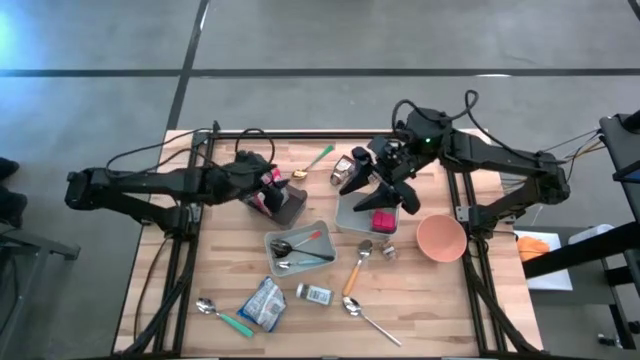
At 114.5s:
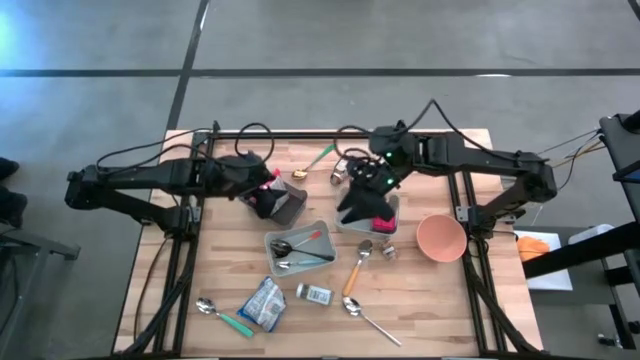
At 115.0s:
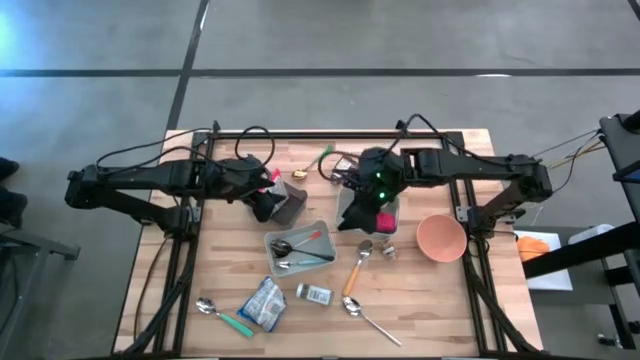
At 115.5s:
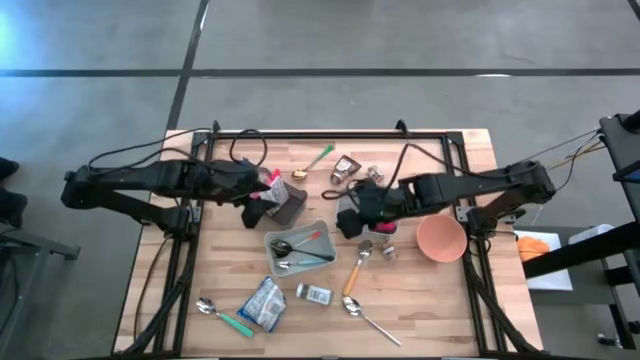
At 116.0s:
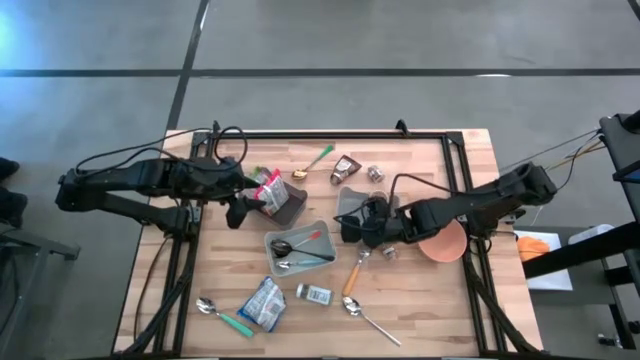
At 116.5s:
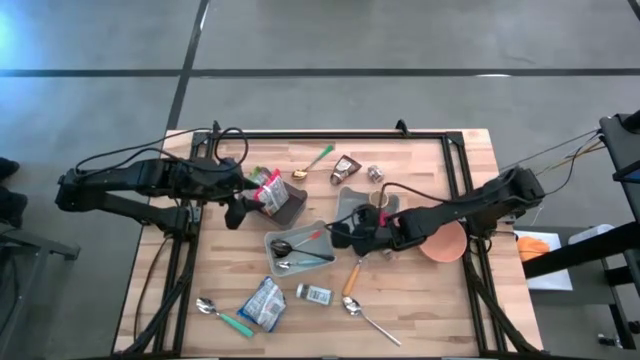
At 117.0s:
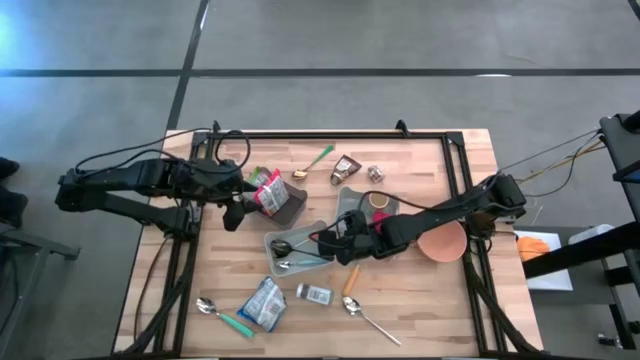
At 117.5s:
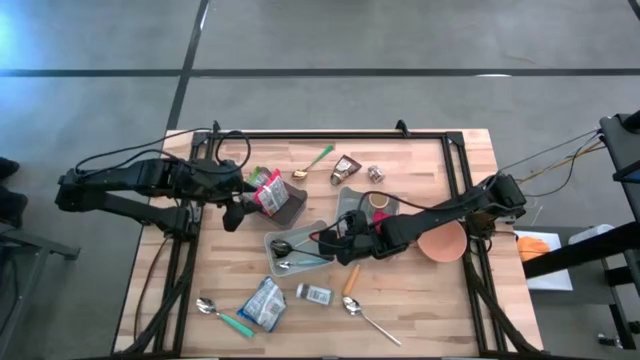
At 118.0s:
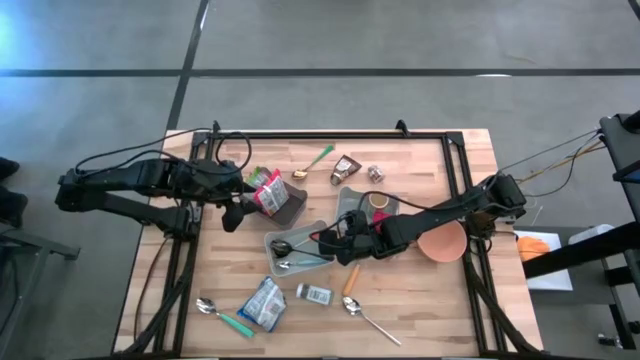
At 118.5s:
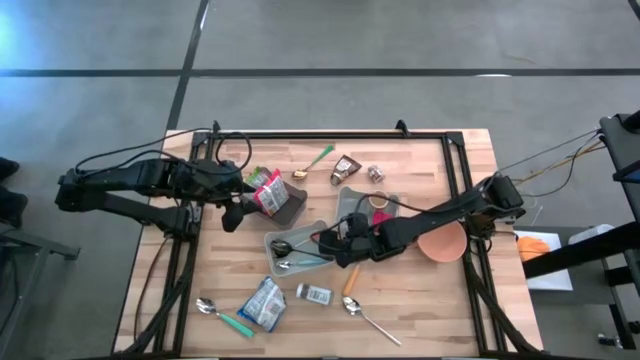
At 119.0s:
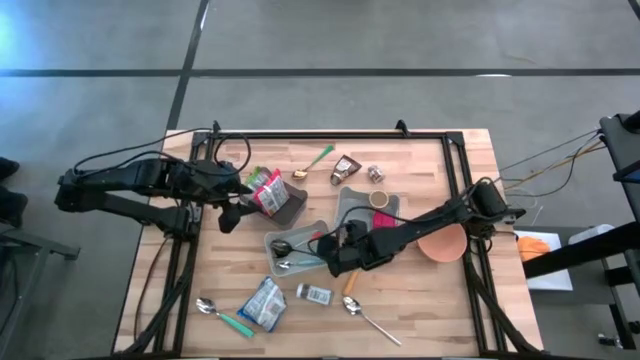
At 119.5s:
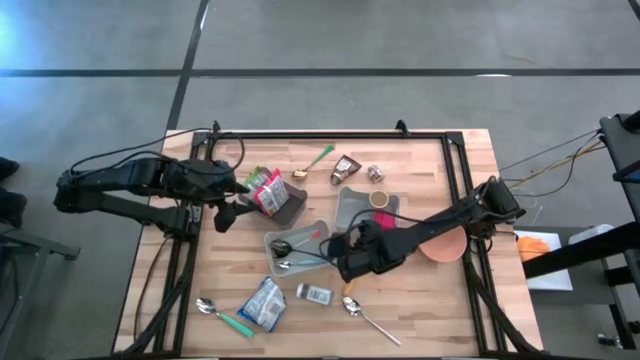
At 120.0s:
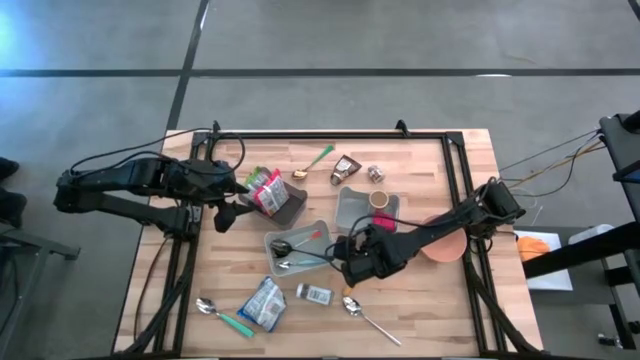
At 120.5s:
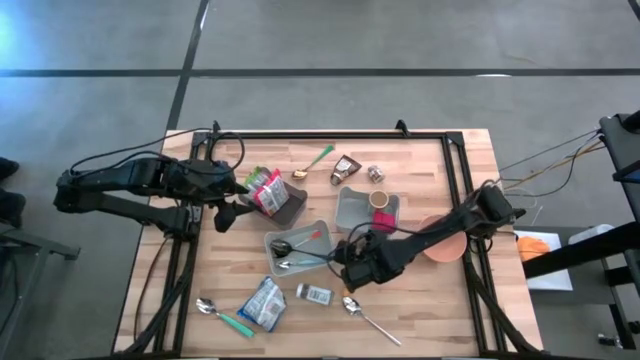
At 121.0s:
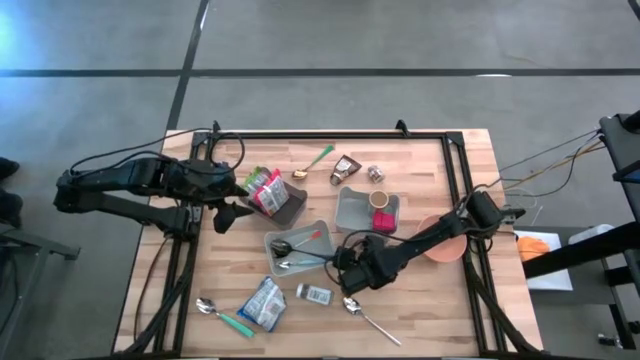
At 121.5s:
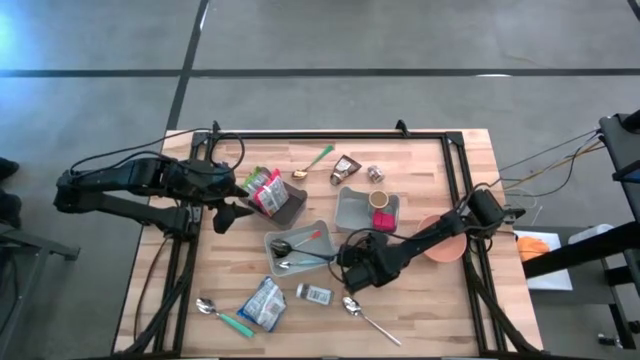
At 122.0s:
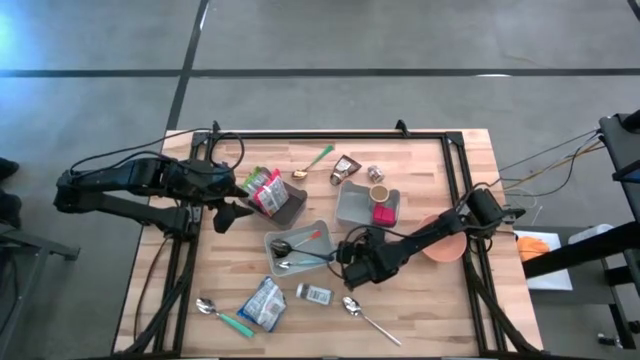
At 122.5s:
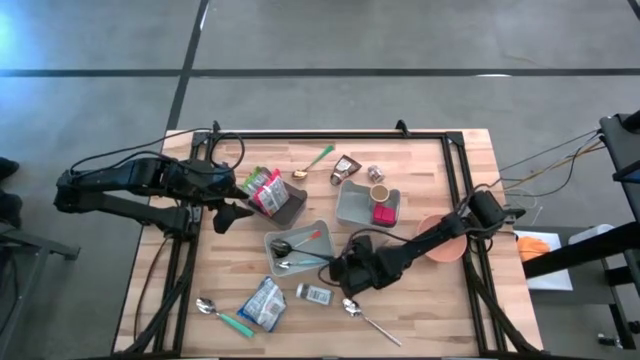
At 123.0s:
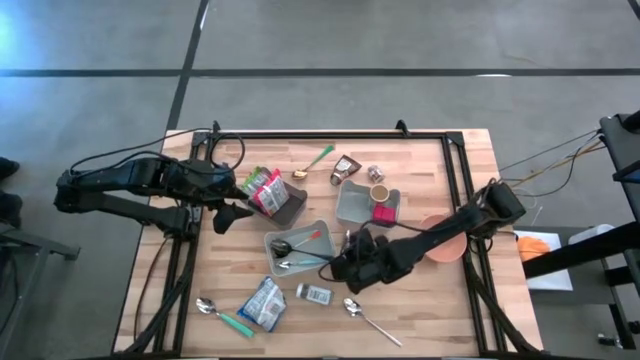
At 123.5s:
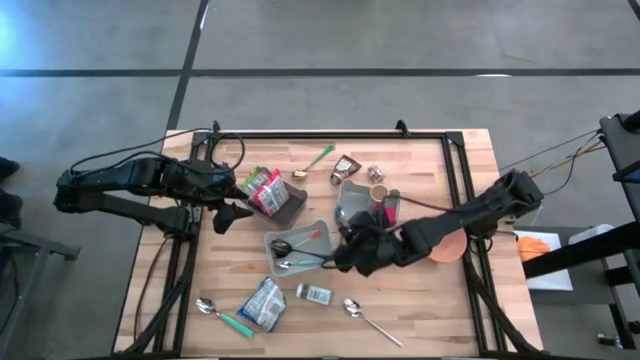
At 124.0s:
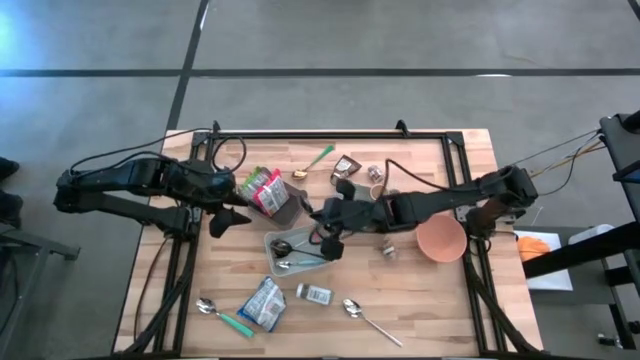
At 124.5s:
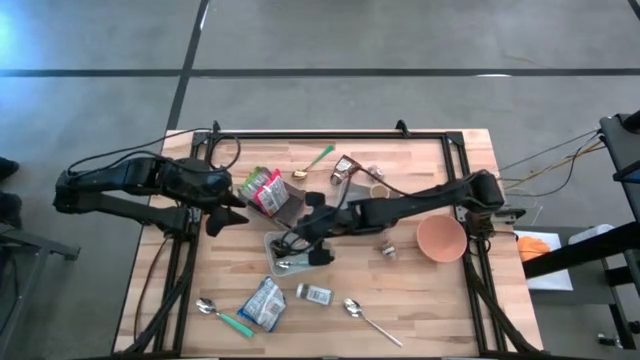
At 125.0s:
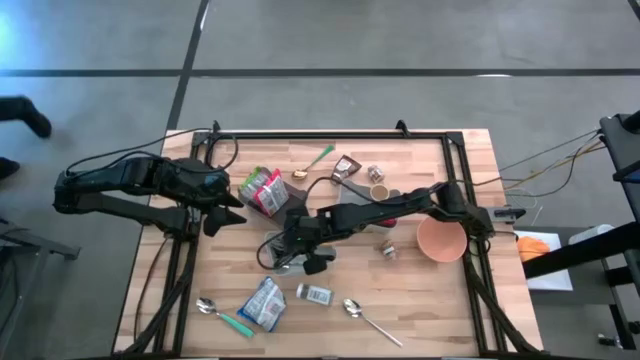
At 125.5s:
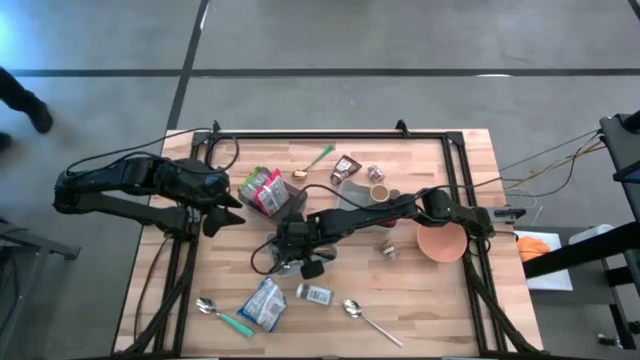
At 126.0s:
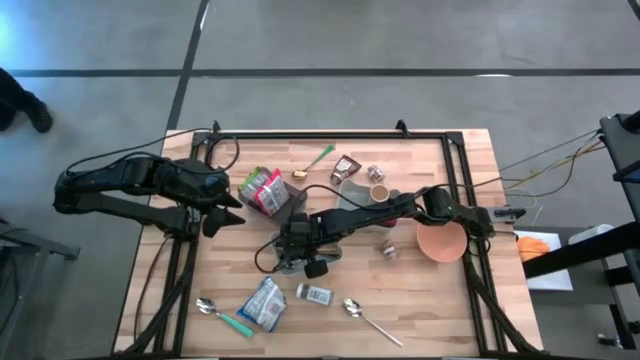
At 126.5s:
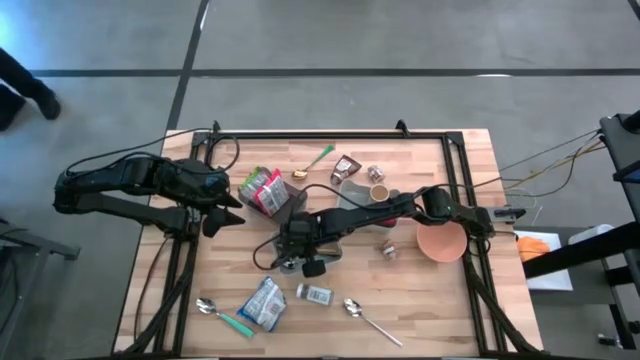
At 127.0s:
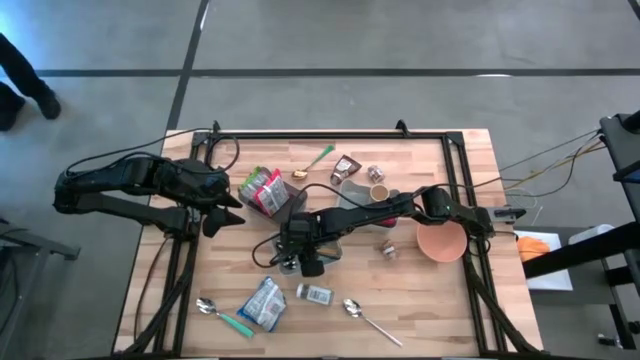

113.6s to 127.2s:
Put the yellow spoon into the bottom gray bin

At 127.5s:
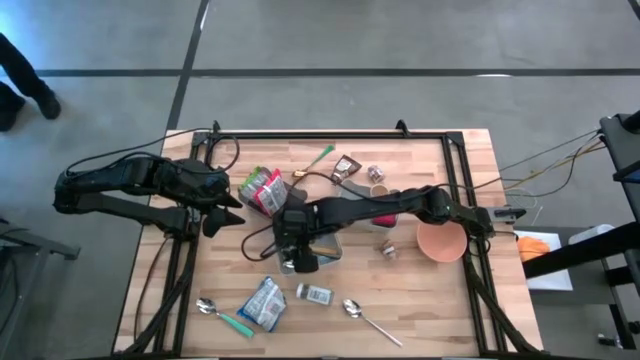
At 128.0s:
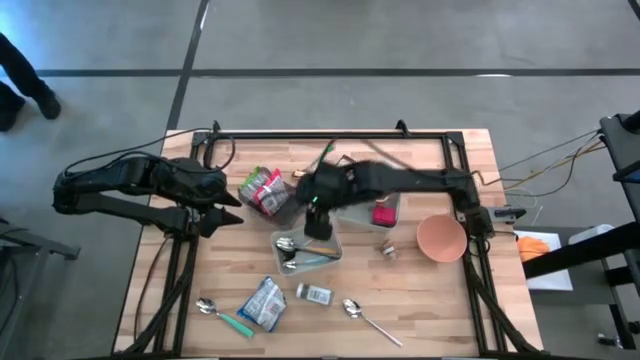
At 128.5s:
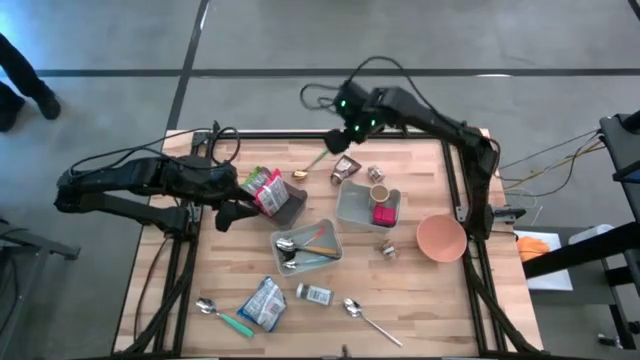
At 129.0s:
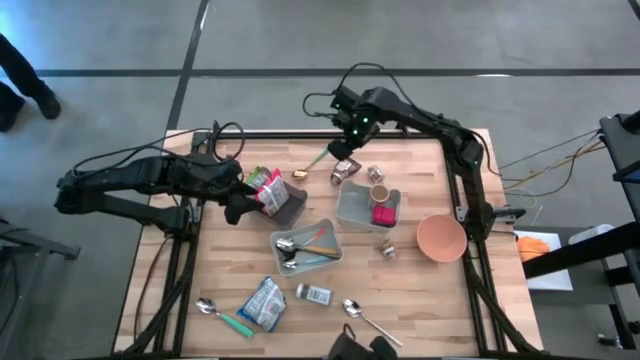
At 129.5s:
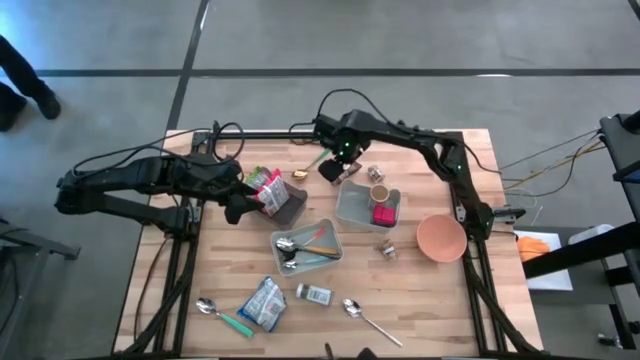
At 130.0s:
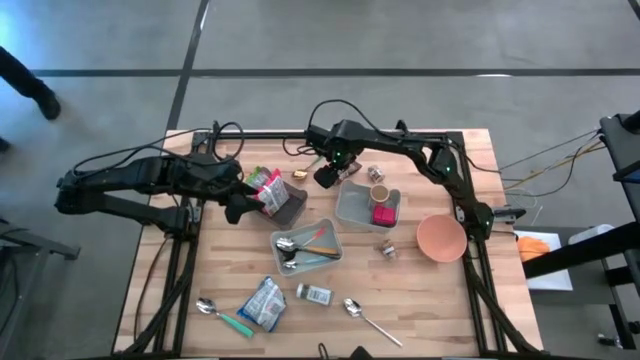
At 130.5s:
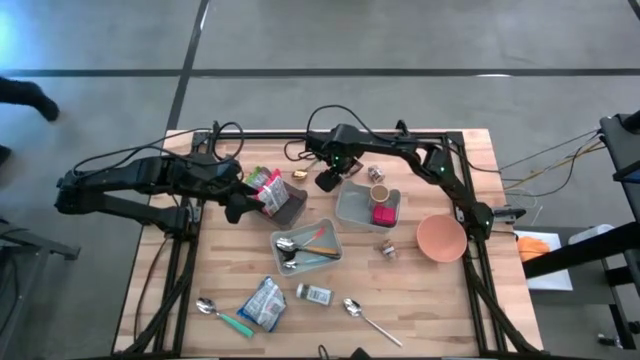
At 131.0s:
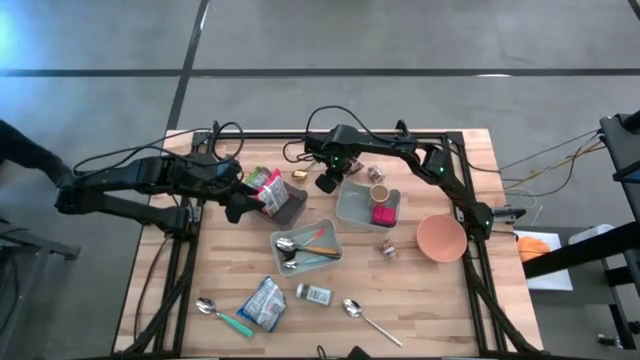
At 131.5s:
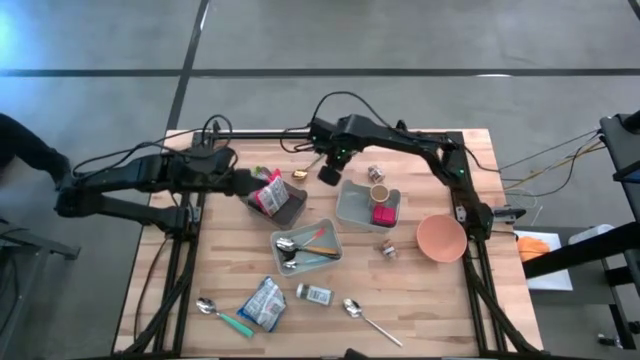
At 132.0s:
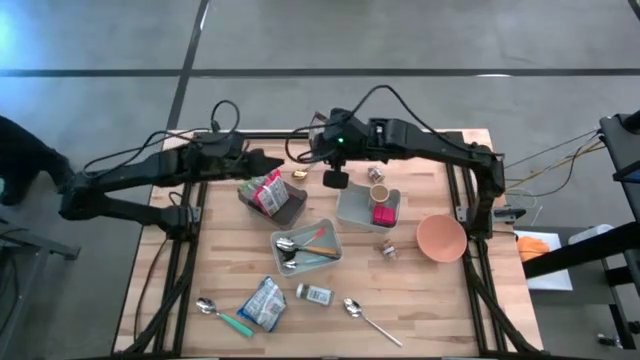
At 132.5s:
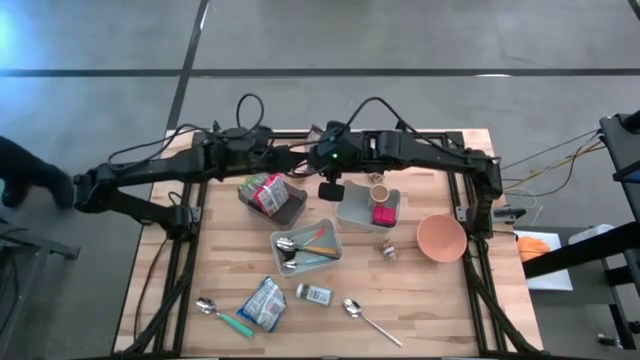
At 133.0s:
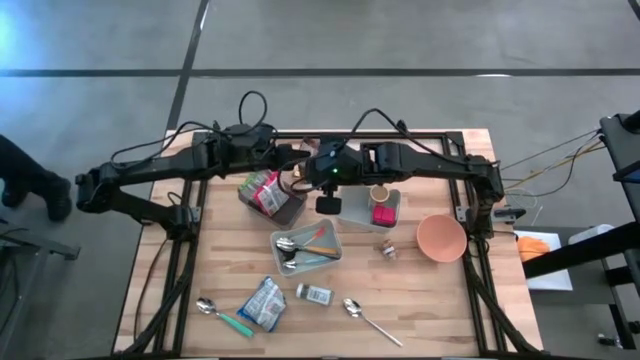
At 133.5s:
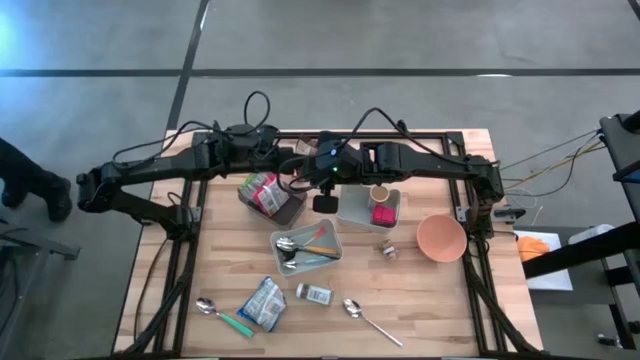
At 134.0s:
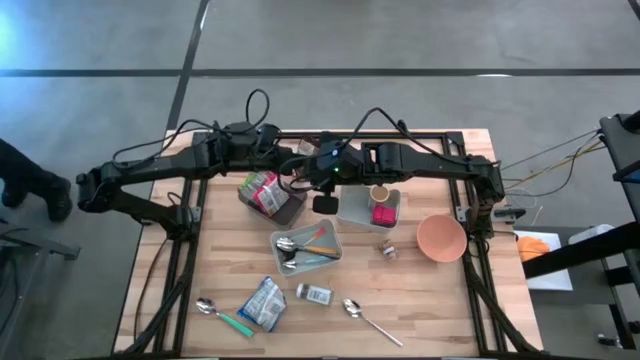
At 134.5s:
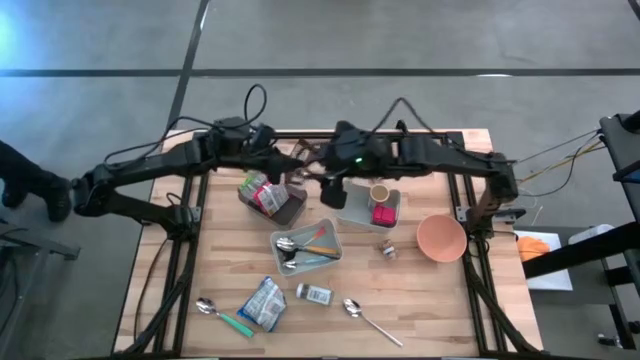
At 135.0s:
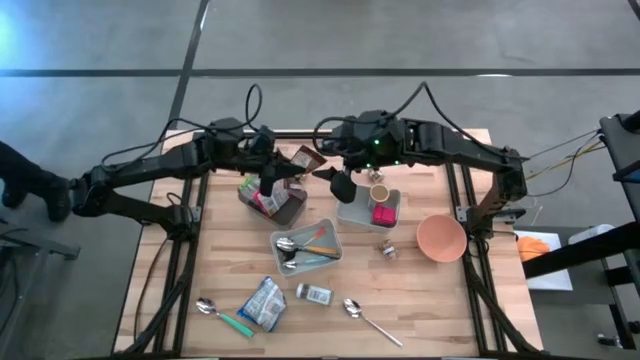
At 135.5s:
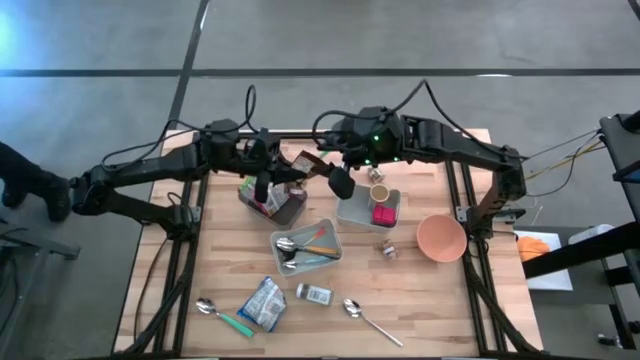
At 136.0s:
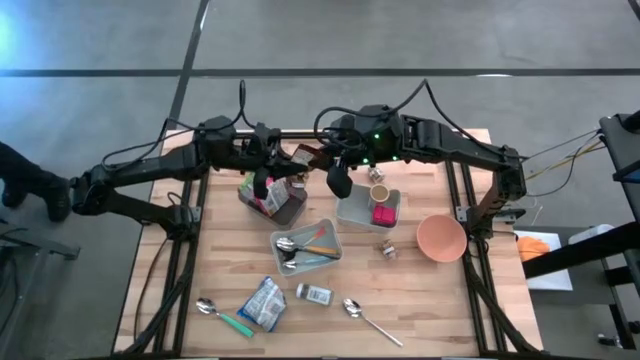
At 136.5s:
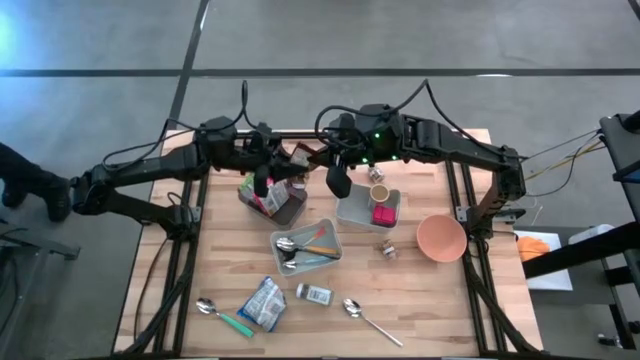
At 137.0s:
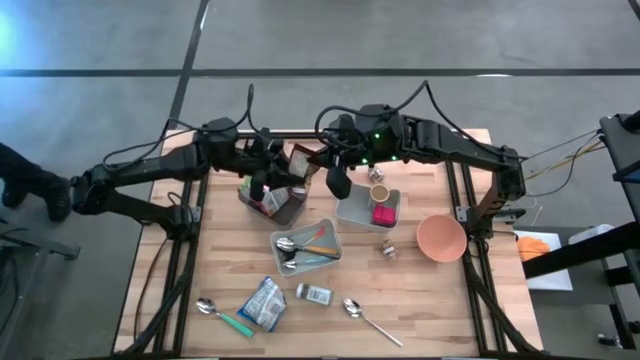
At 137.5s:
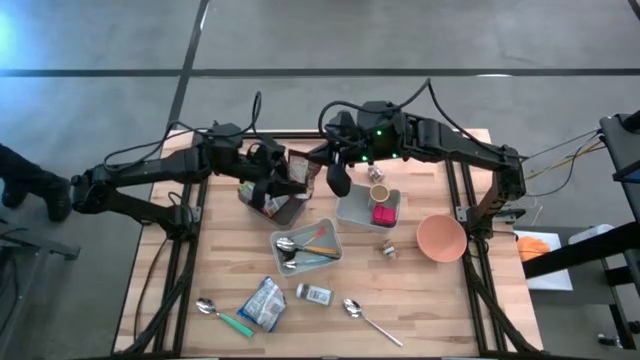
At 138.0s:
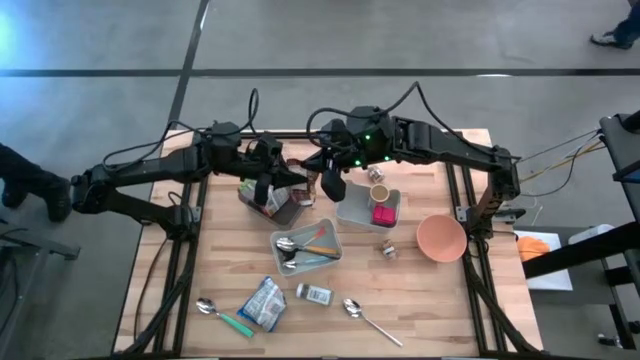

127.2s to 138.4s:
Put the orange seasoning pack into the top gray bin
